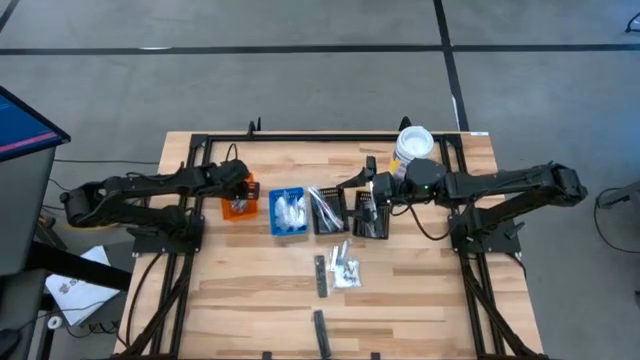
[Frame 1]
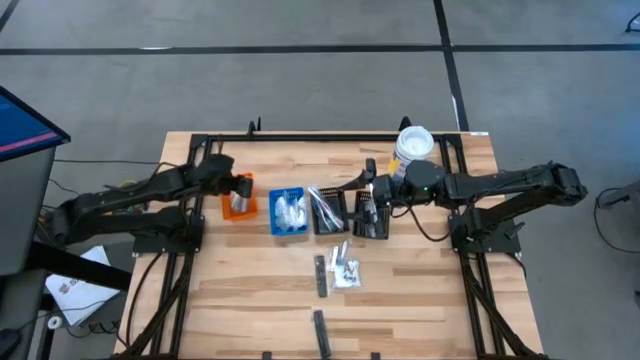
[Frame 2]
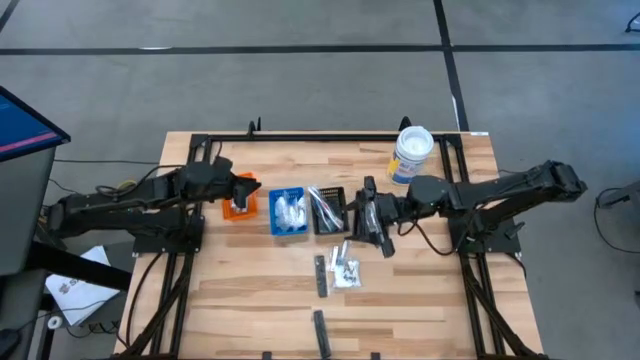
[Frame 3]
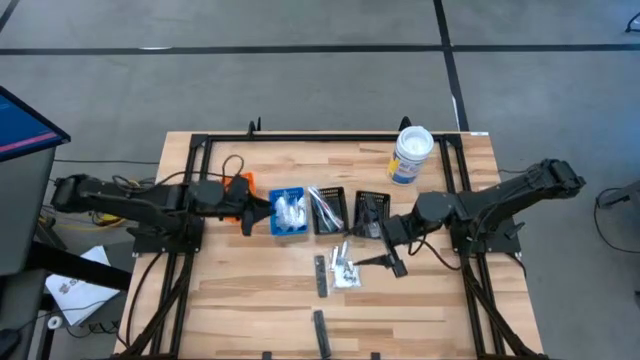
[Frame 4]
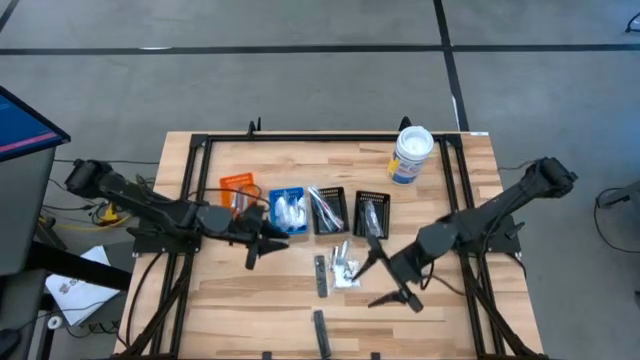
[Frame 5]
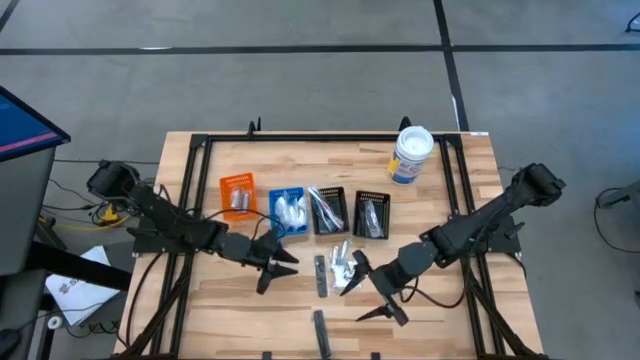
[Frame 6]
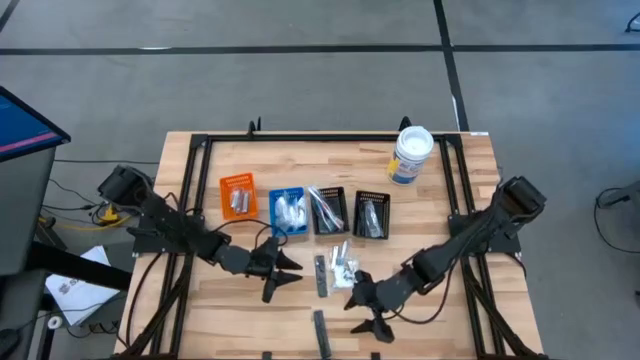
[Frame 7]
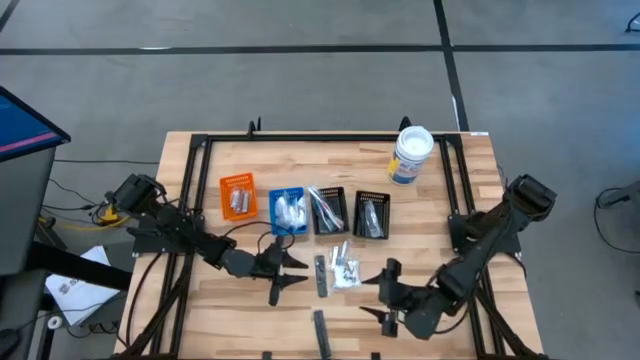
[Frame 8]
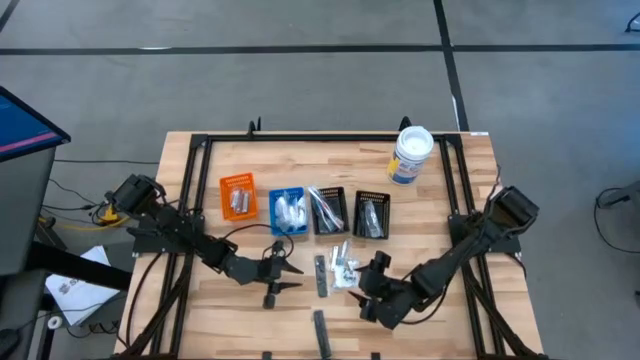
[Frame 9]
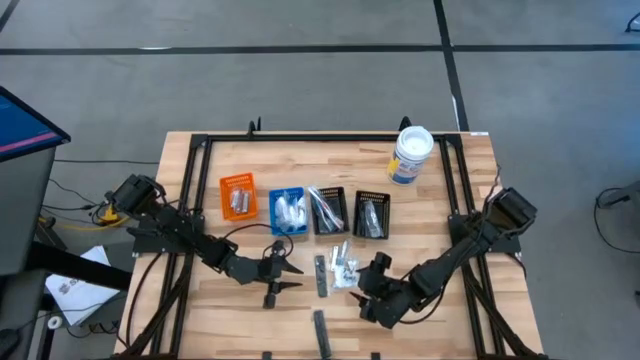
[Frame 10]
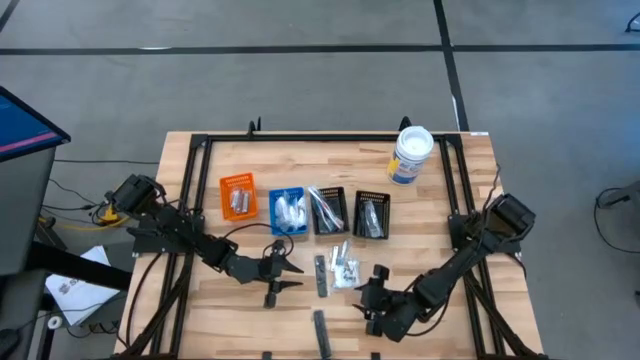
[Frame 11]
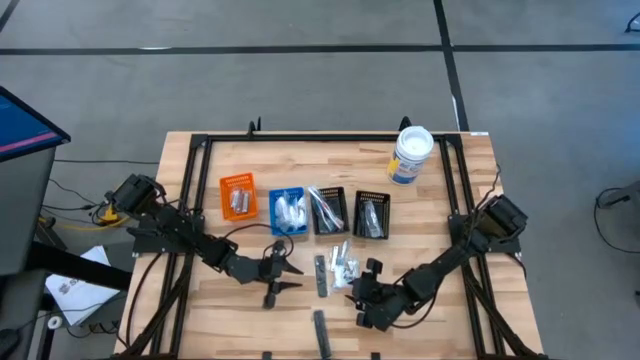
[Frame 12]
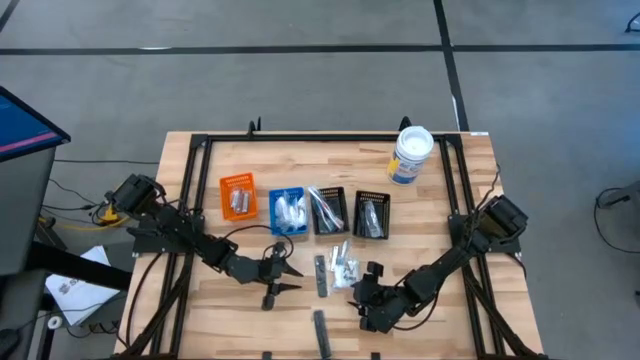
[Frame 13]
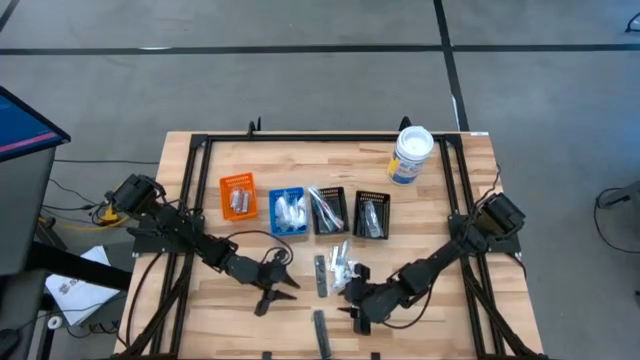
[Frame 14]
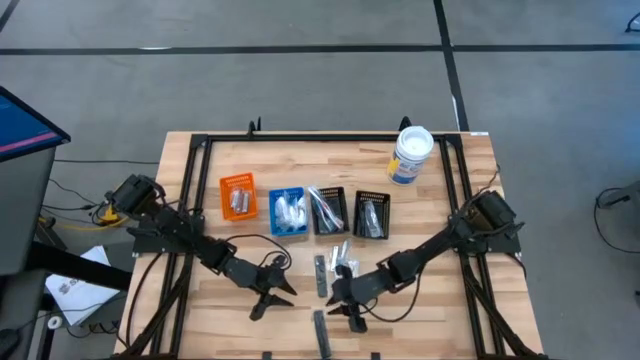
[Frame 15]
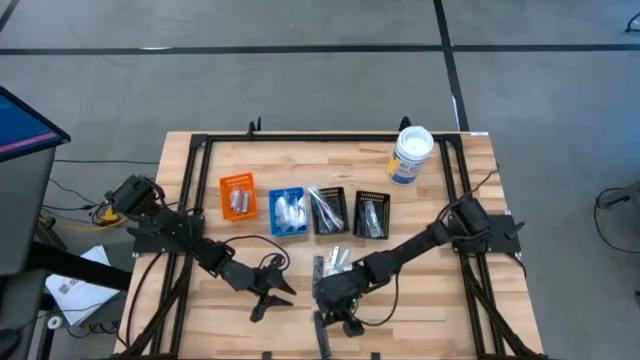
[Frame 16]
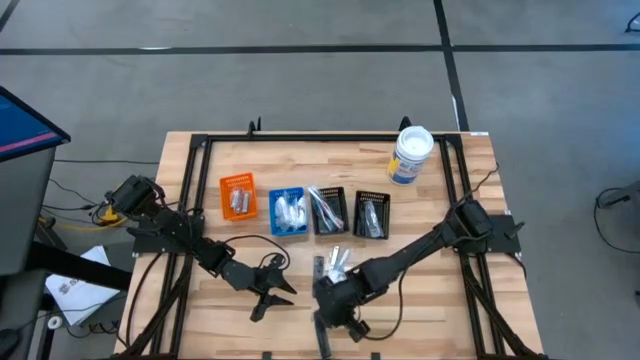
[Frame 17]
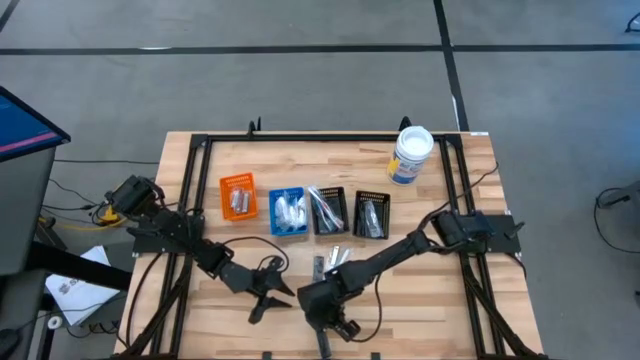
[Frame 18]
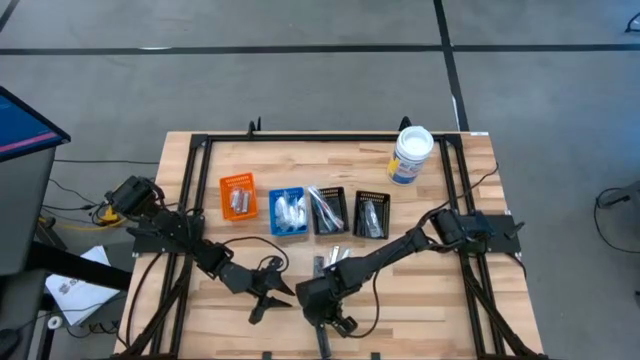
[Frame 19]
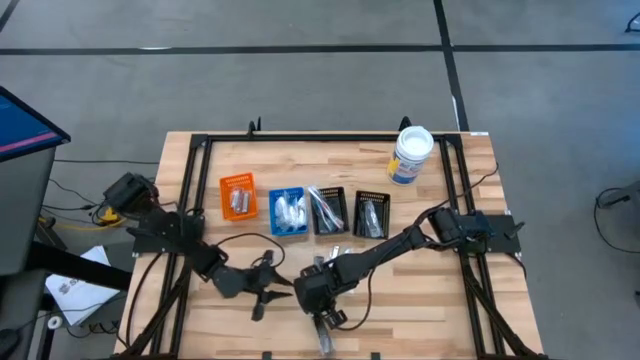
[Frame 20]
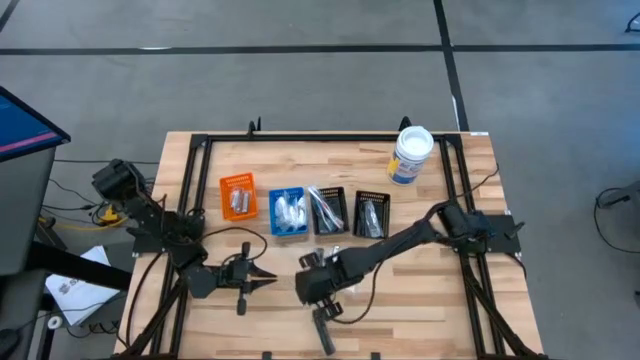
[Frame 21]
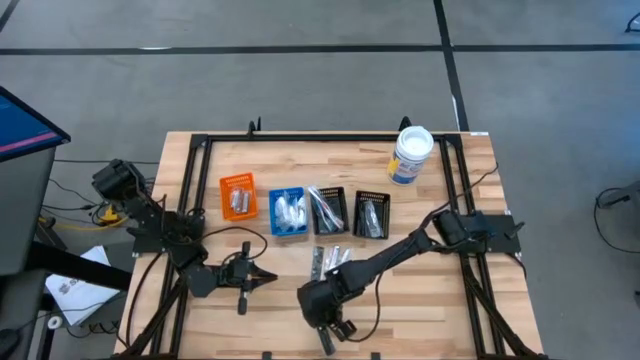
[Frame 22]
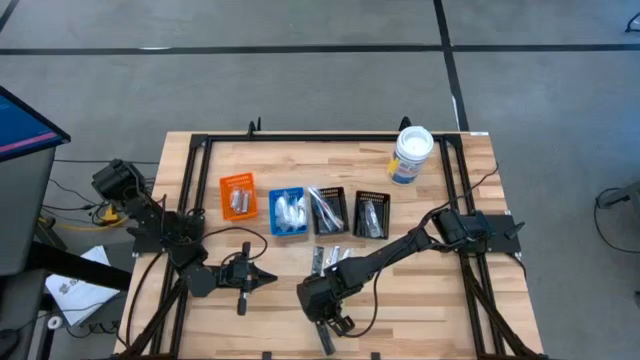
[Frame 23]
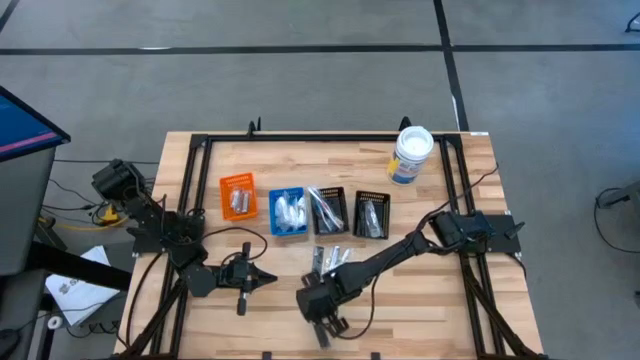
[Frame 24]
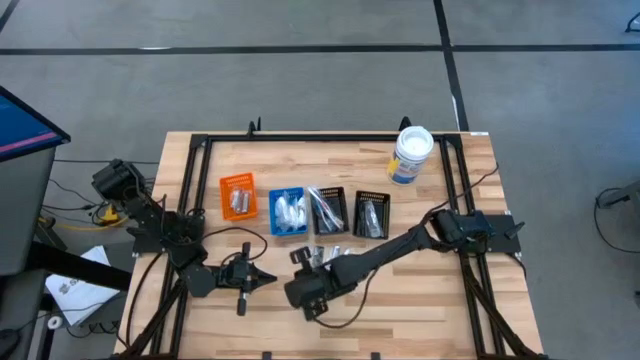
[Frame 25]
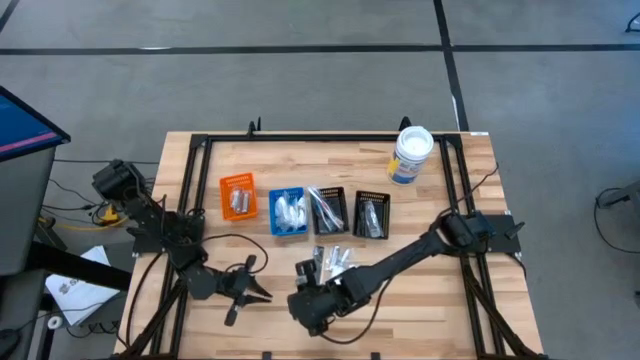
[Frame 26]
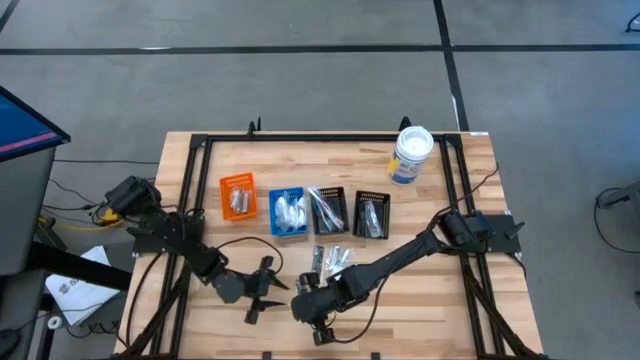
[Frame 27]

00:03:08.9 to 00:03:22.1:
Task: Pick & Place Travel size toiletries
Put the black comb into the right black bin

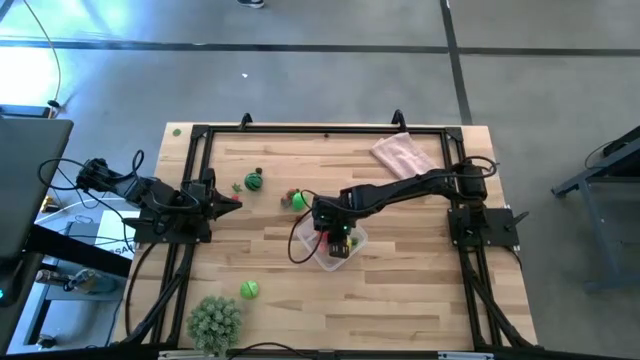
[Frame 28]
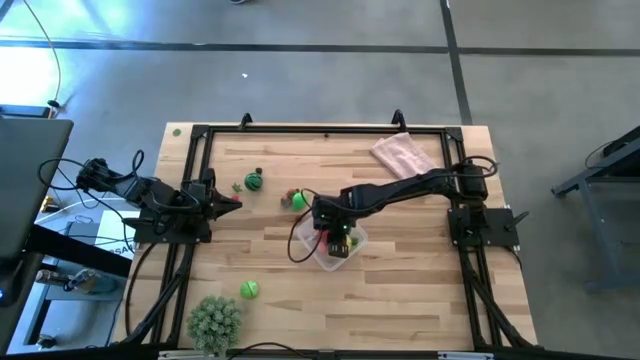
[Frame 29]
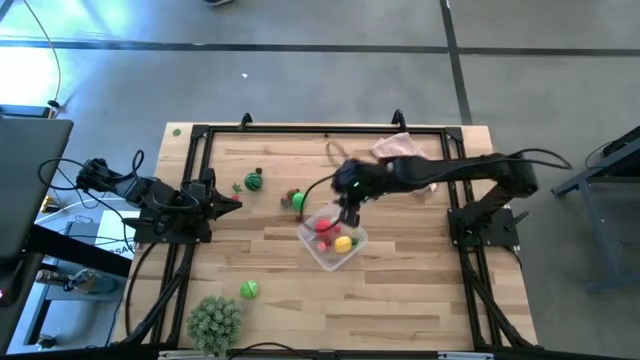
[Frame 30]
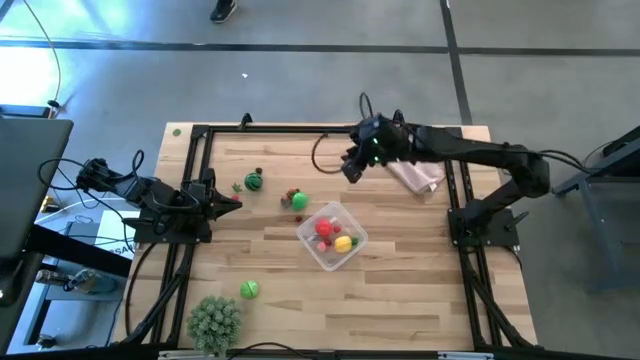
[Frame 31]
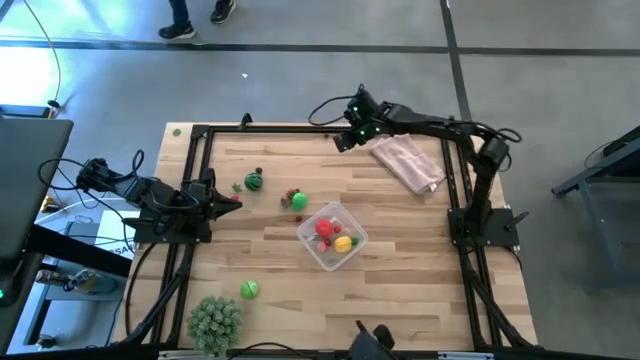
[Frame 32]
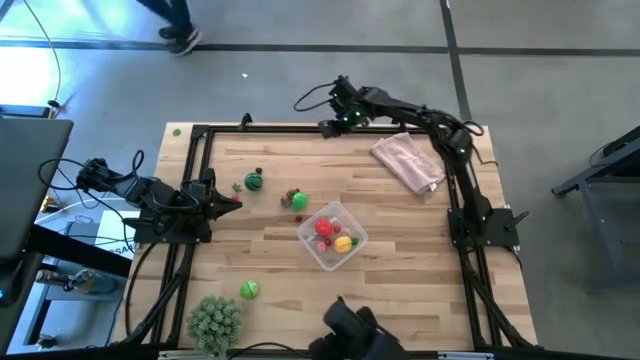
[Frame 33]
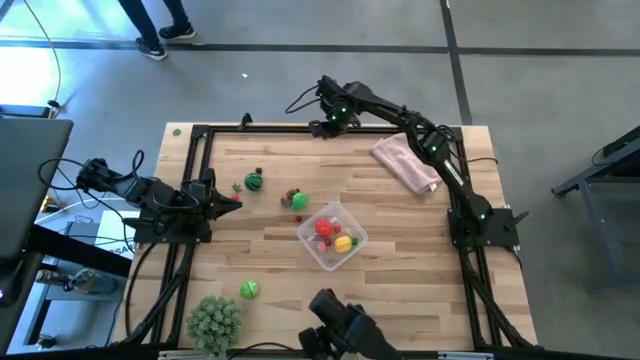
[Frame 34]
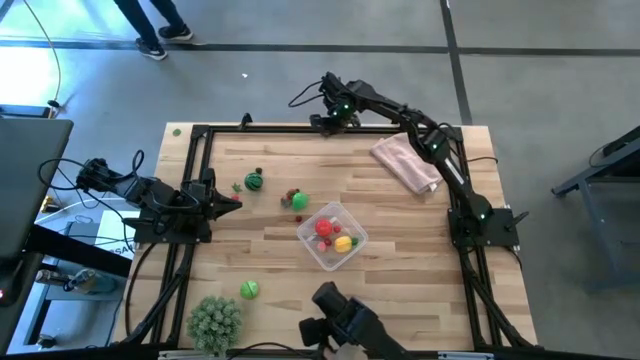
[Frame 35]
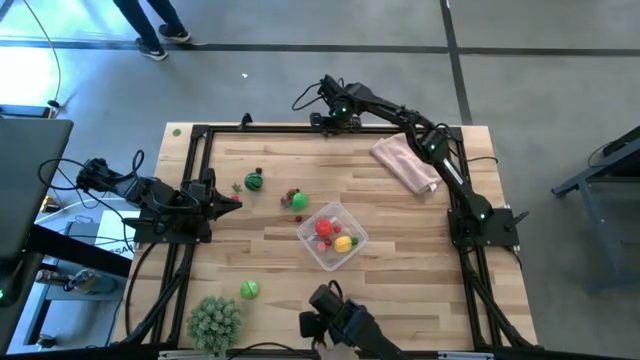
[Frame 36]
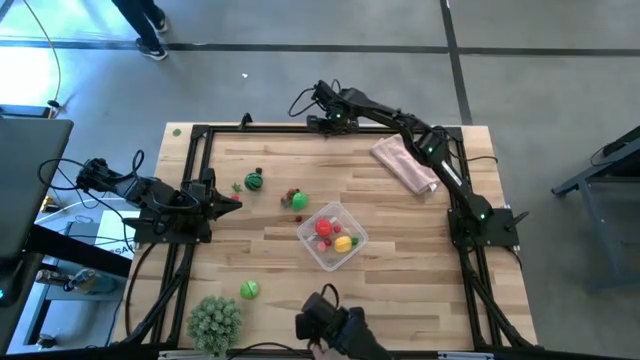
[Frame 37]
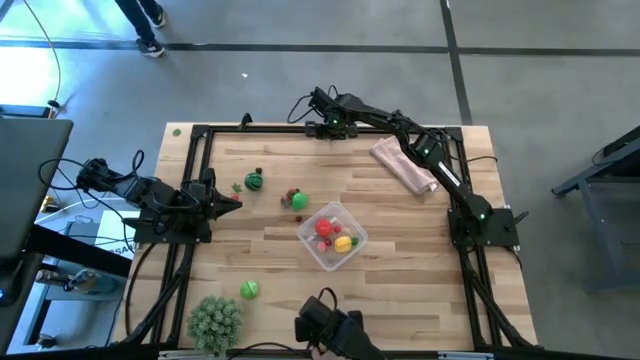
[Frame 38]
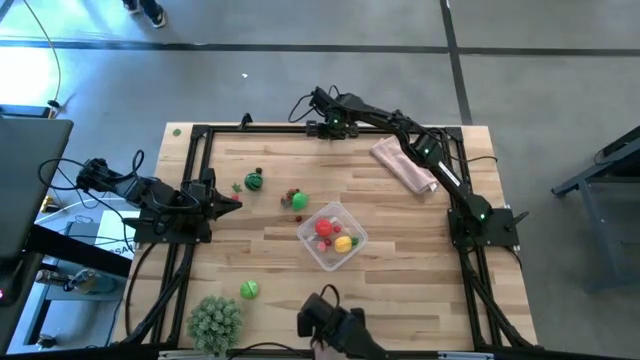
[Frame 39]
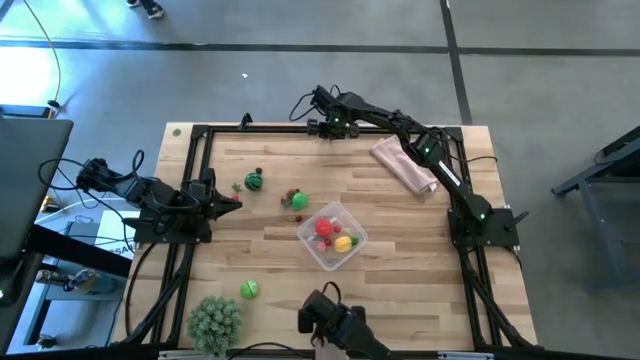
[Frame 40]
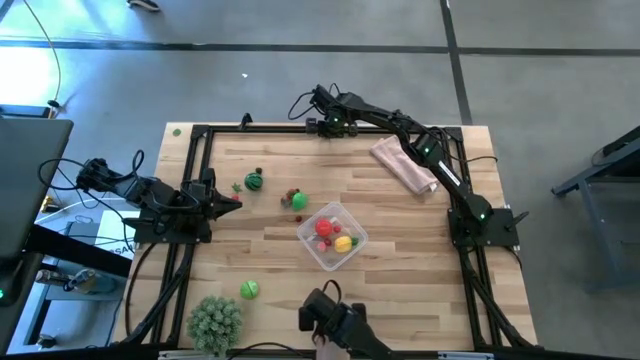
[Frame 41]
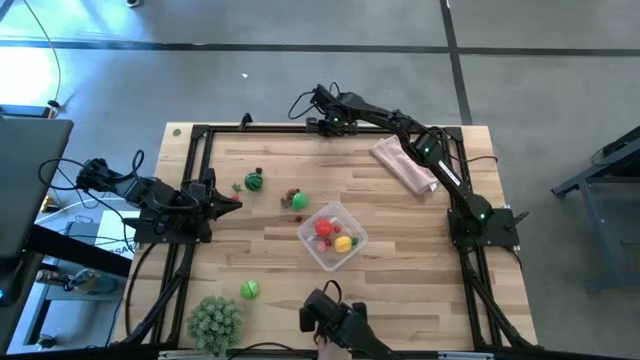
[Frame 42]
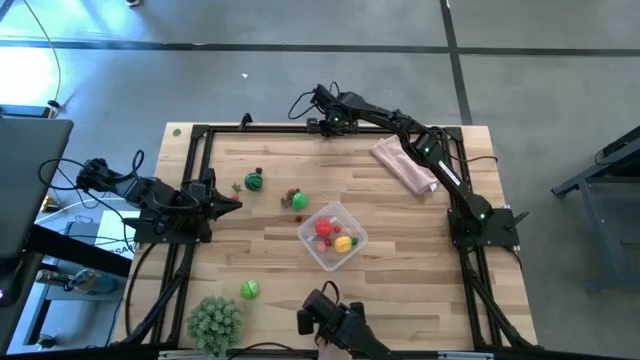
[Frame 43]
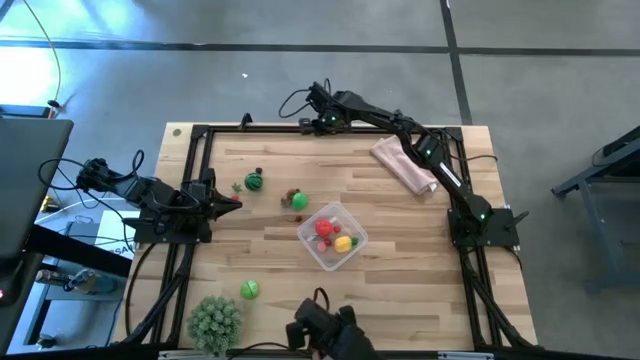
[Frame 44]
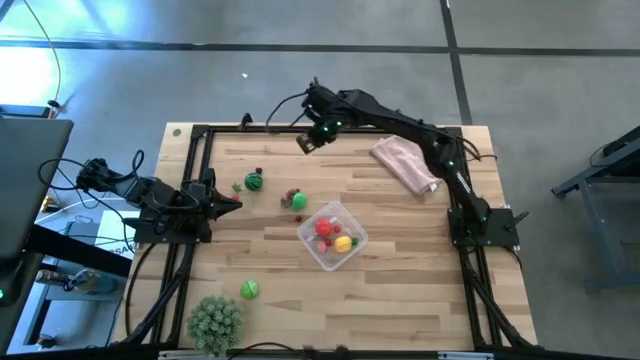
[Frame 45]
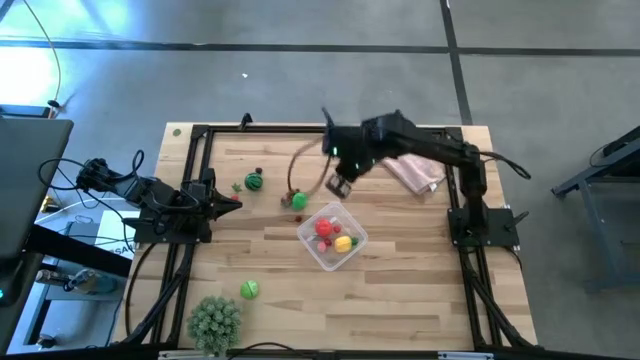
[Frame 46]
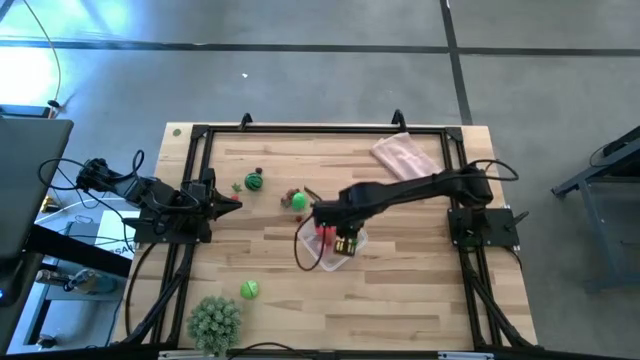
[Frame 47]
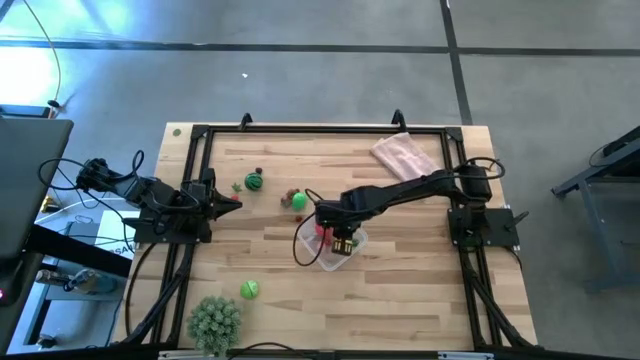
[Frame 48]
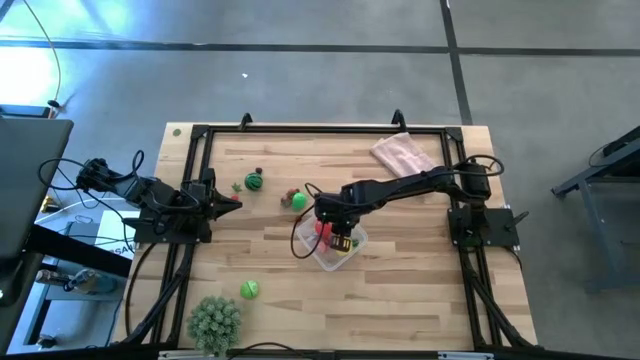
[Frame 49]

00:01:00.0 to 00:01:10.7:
Task: Pick and placing Produce into tupperware
Put the blueberry into the transparent container
